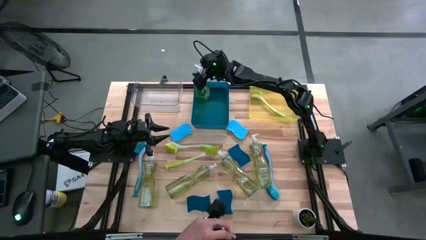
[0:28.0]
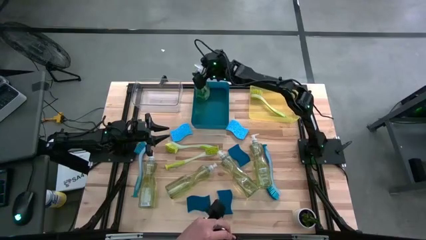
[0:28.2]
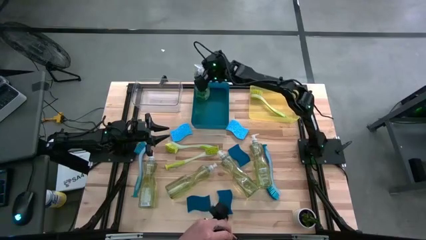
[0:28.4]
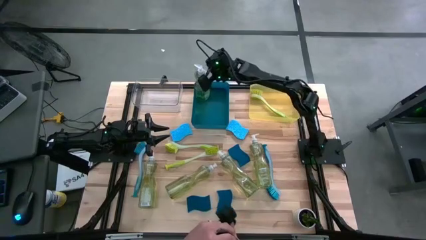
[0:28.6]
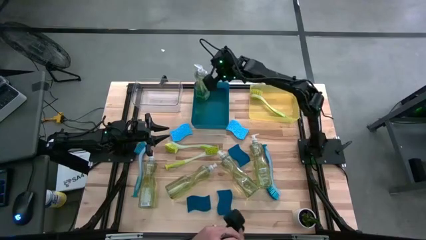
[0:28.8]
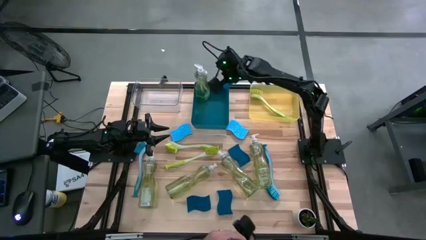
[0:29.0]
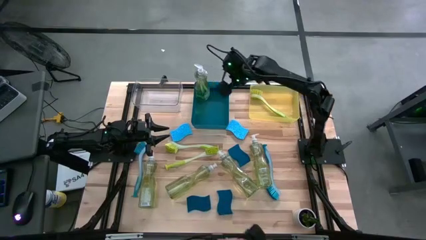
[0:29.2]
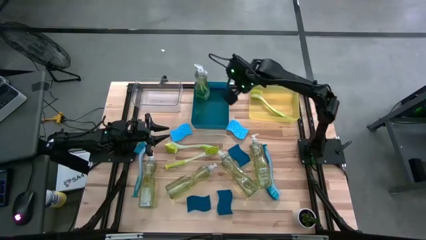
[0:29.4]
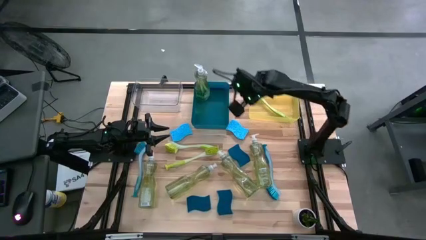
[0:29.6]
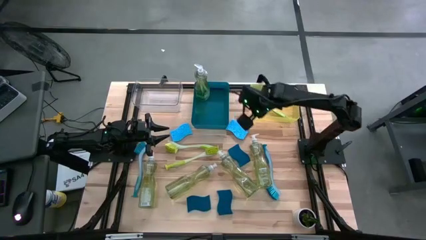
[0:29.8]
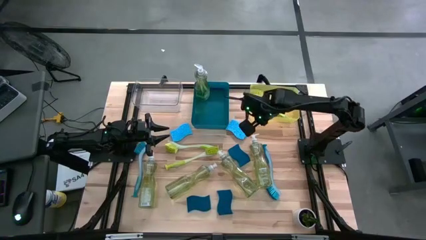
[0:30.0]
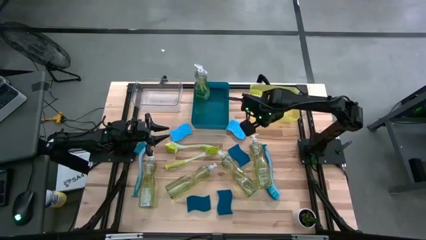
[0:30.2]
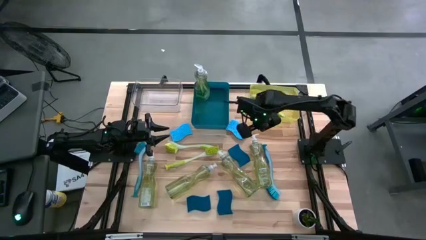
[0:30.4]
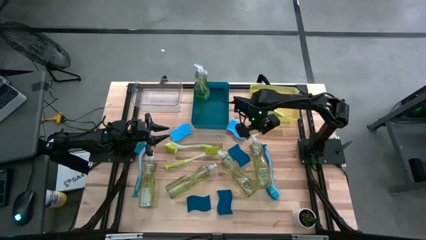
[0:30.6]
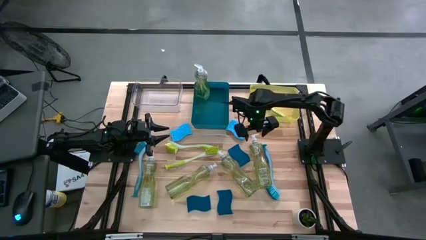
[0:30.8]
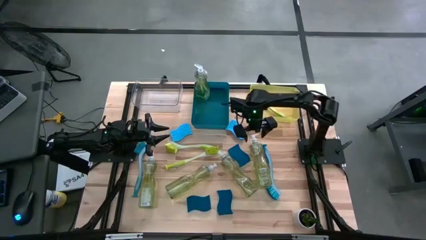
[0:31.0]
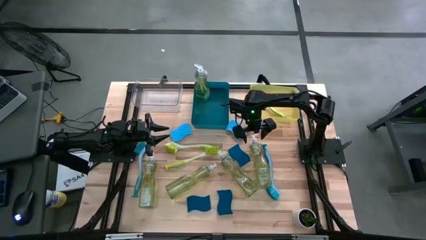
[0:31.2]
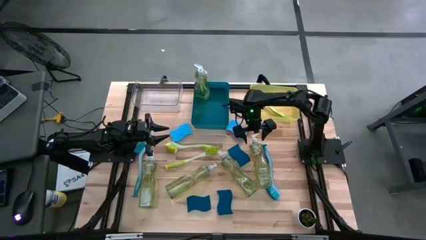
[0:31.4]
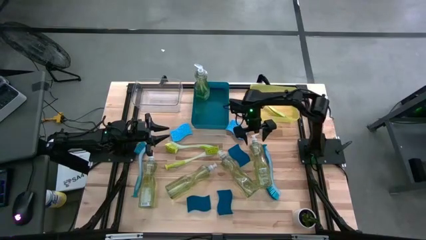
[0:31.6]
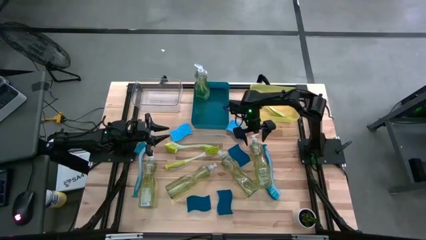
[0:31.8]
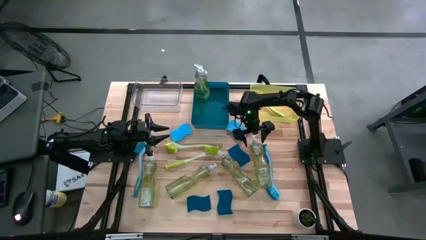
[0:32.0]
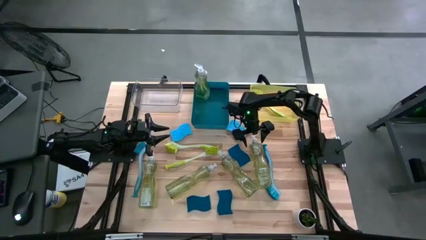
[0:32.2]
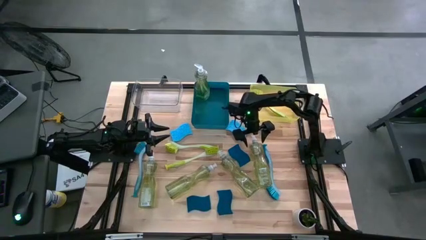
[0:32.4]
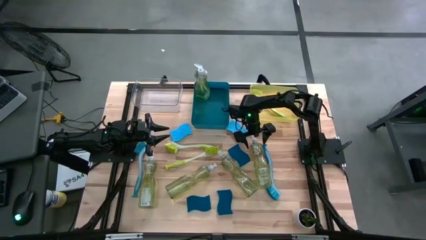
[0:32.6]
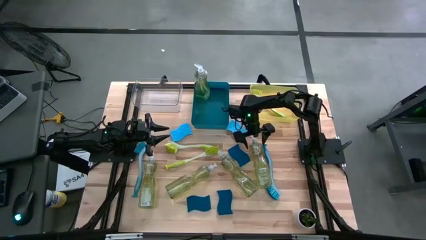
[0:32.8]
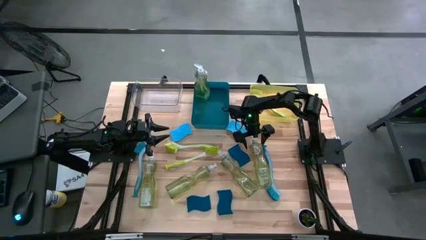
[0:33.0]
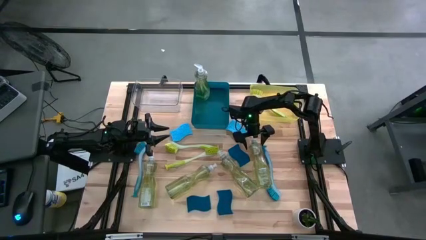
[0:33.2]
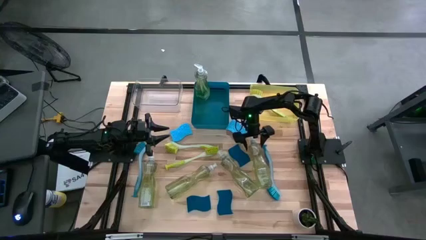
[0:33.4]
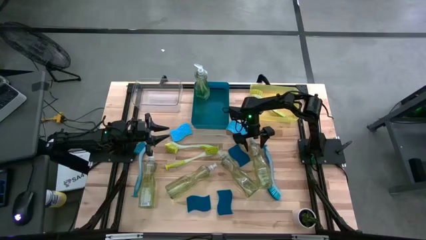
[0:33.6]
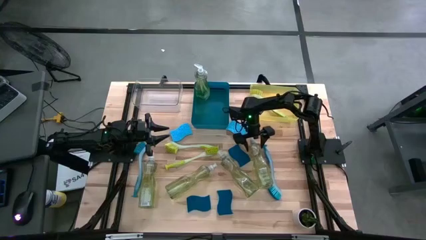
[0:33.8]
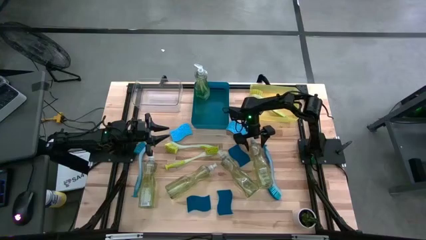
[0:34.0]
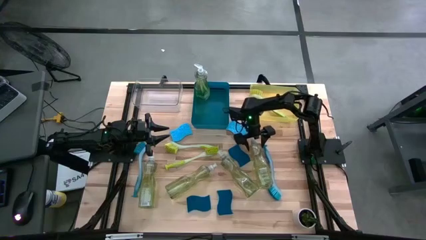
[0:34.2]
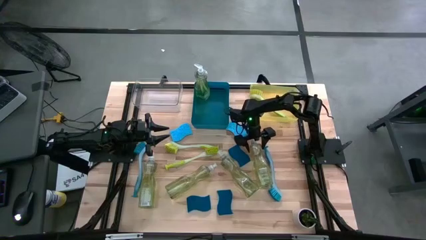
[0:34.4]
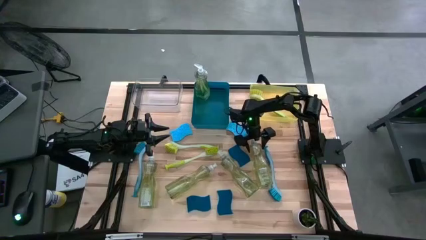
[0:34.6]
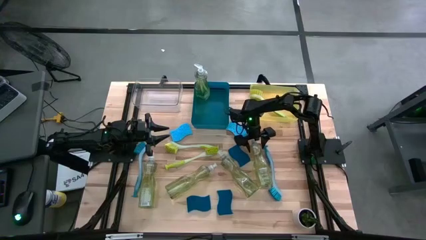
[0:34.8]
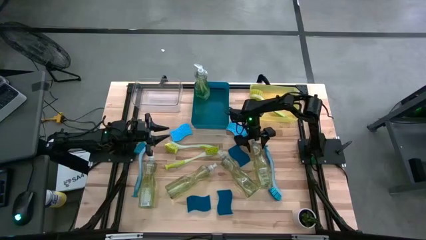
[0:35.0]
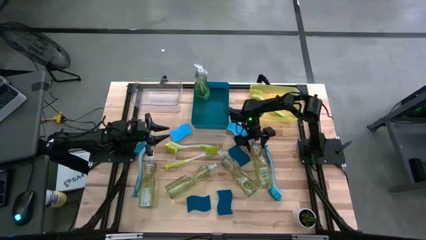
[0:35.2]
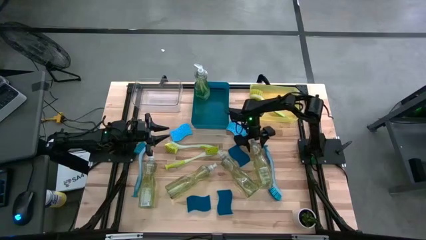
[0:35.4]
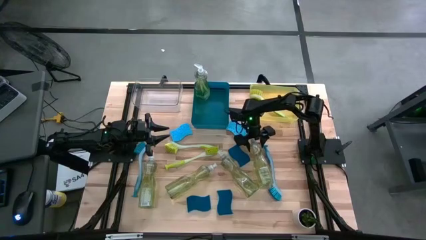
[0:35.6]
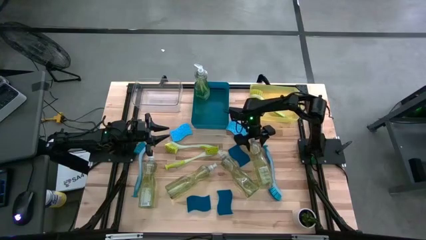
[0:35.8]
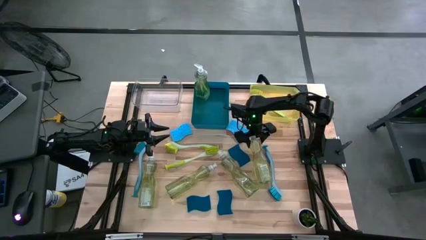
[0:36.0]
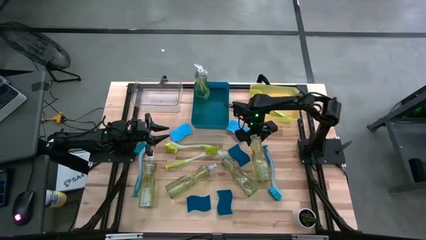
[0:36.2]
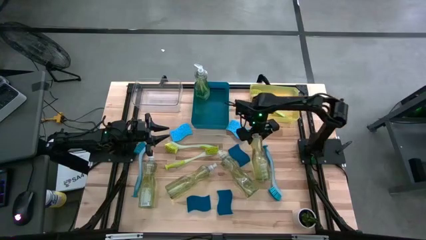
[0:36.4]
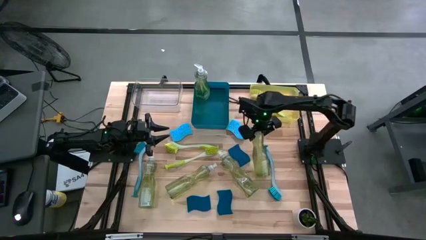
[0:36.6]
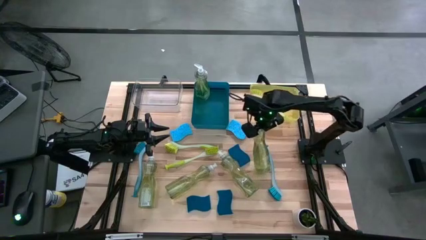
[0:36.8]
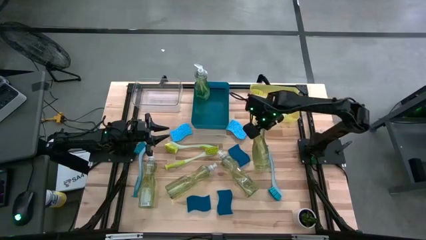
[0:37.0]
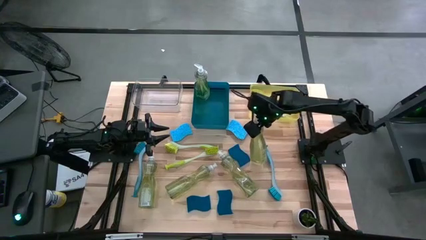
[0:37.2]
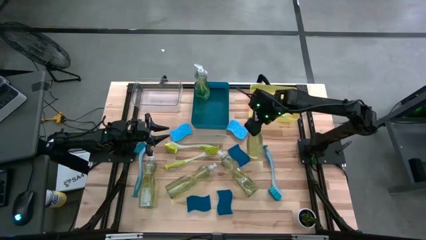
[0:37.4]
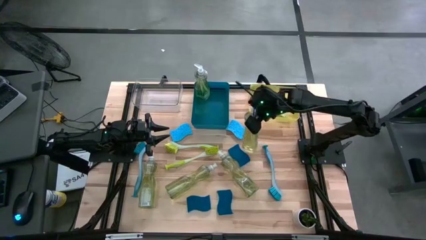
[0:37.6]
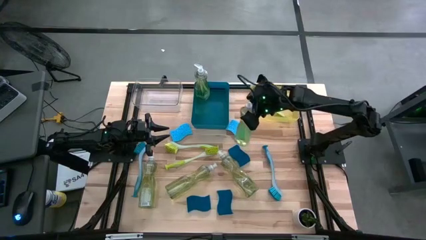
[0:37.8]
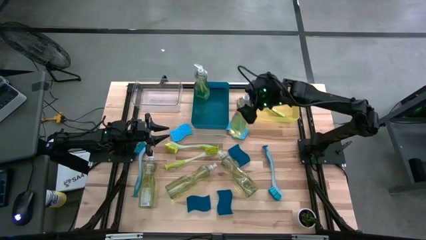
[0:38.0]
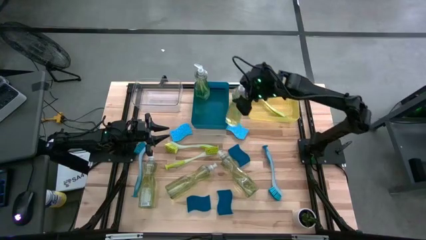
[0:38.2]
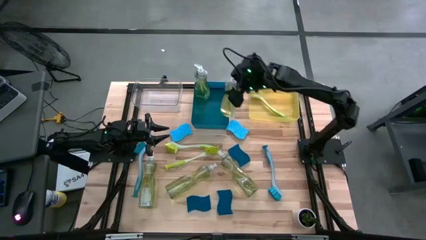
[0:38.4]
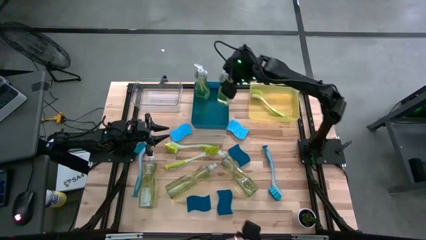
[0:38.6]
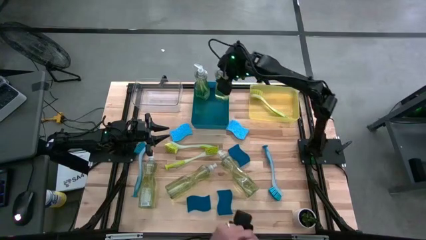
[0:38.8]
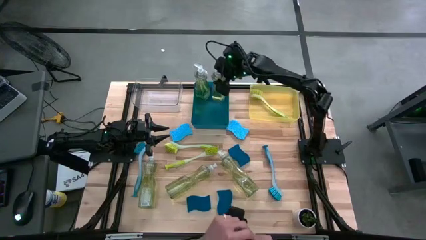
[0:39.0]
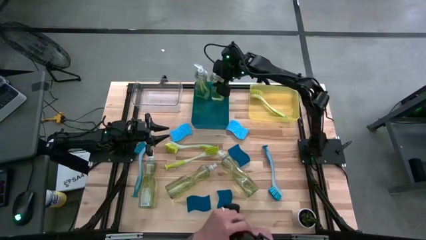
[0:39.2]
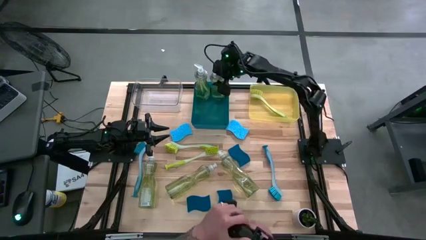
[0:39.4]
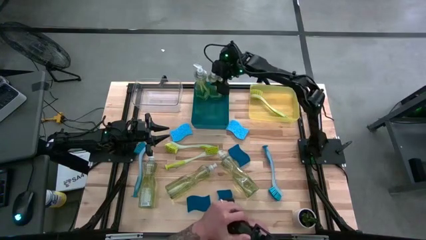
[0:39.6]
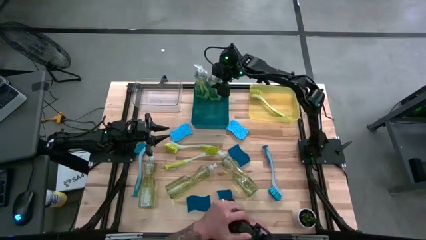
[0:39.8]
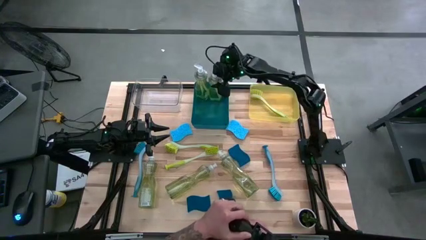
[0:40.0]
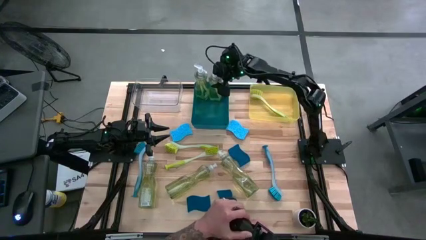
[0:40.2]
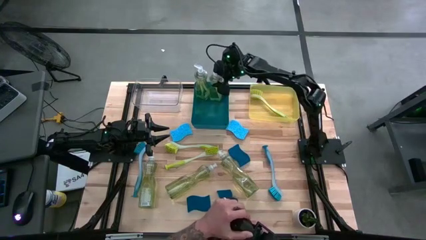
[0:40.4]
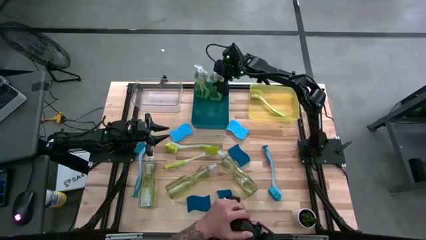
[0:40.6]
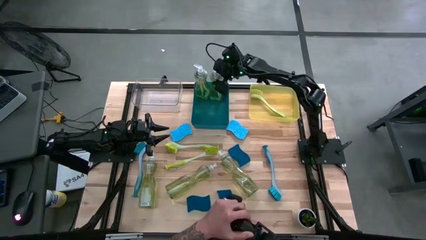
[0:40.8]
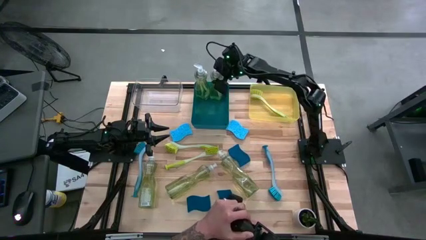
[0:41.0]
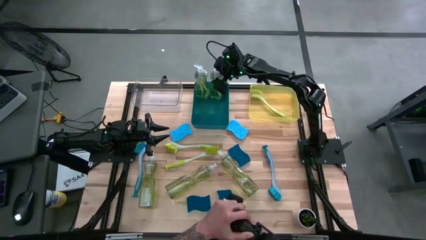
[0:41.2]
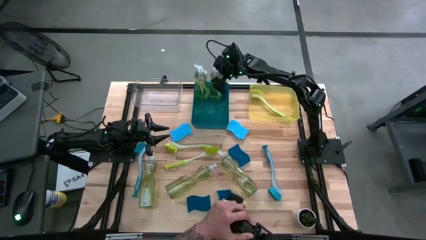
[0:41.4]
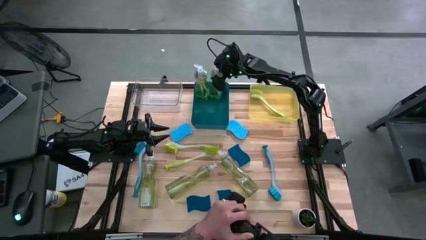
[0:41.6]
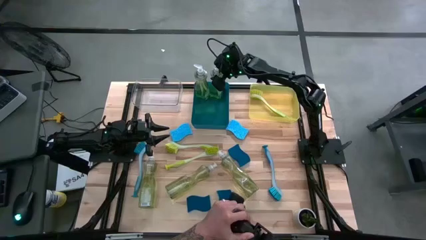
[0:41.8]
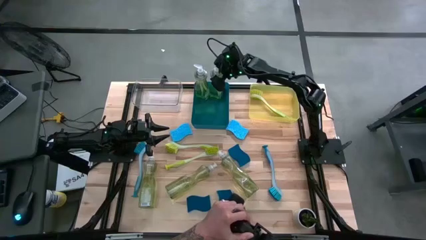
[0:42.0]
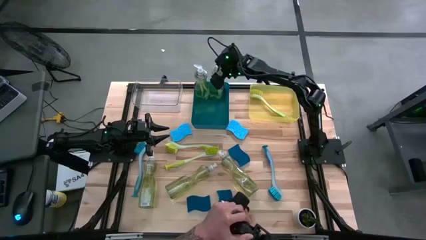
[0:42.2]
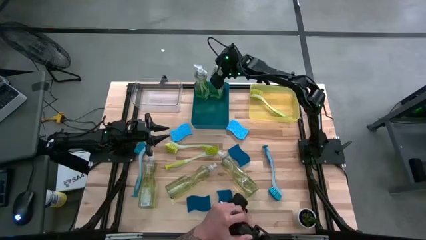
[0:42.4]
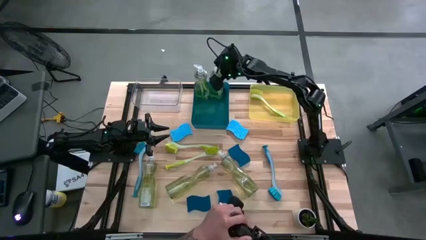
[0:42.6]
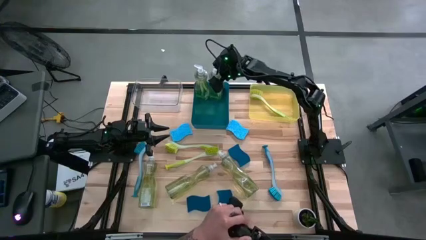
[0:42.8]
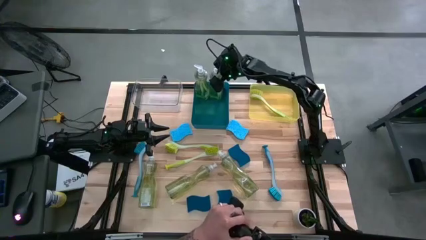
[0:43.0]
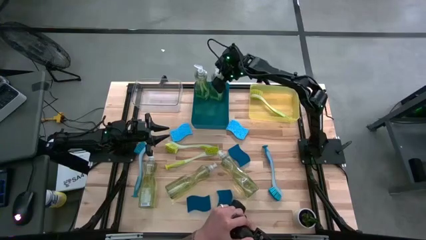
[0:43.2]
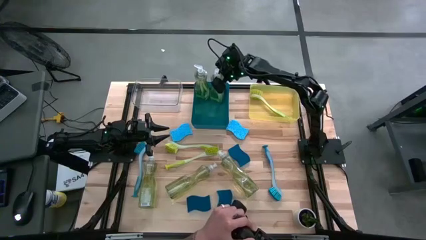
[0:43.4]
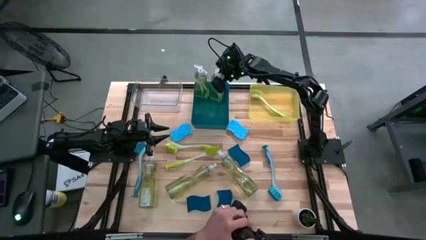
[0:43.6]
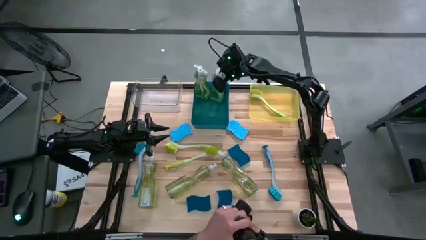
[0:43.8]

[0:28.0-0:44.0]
Task: Pick & Place Kitchen Sink Supplies
Put the yellow soap dispenser into the blue bin
